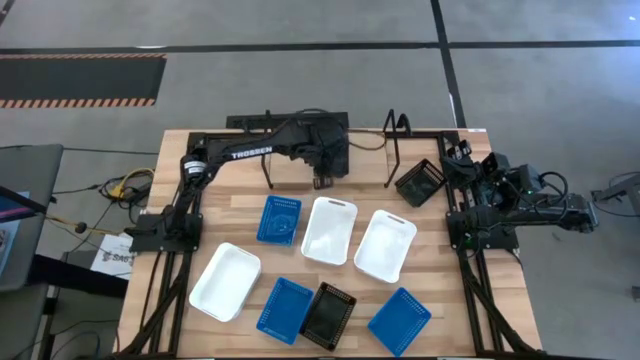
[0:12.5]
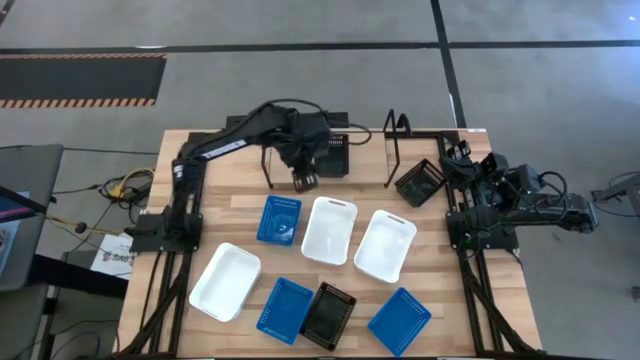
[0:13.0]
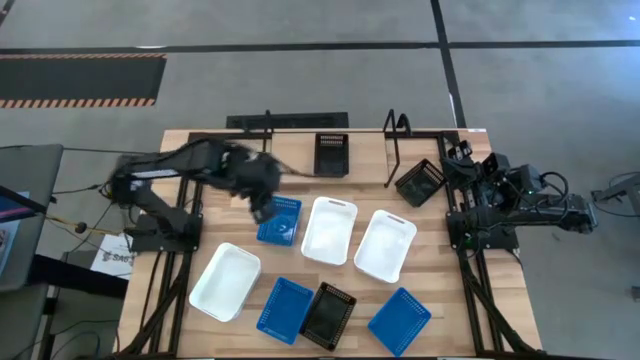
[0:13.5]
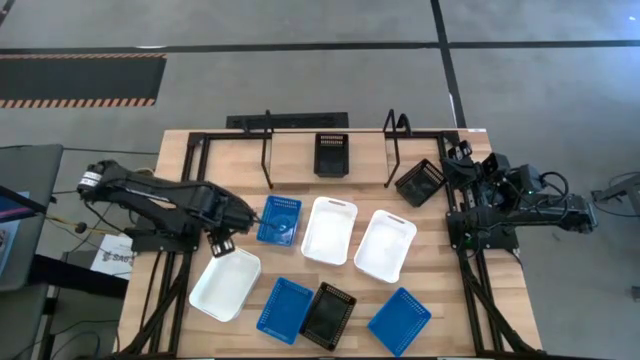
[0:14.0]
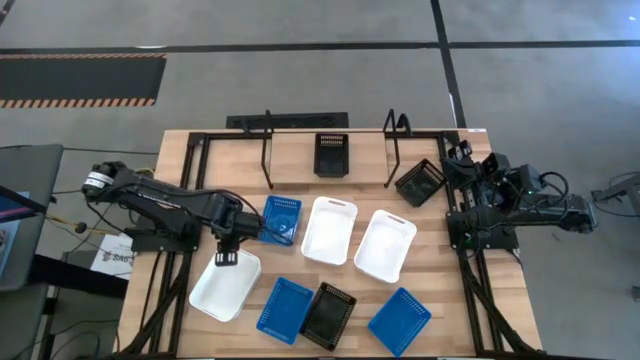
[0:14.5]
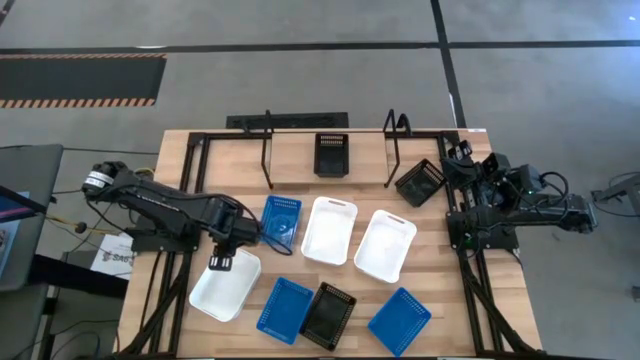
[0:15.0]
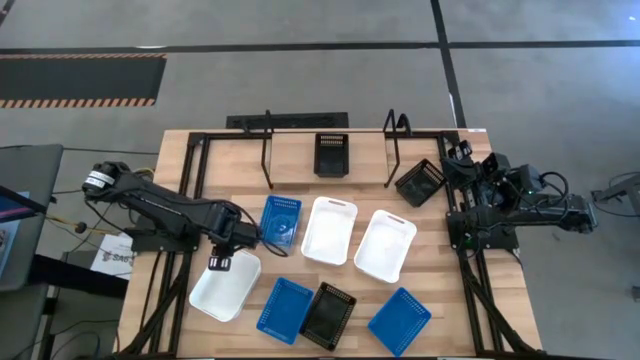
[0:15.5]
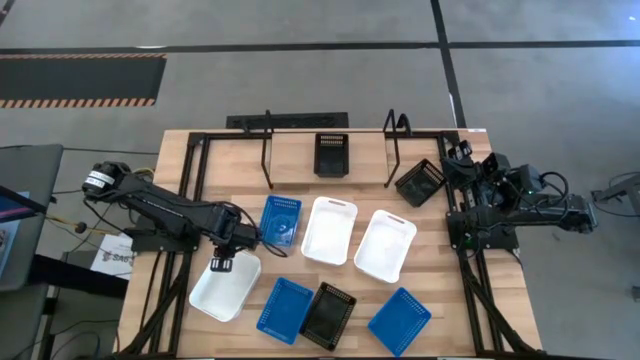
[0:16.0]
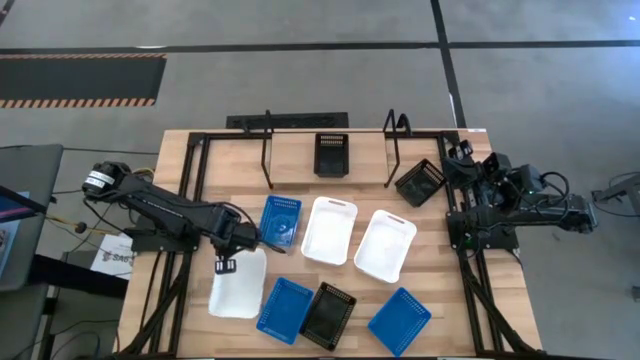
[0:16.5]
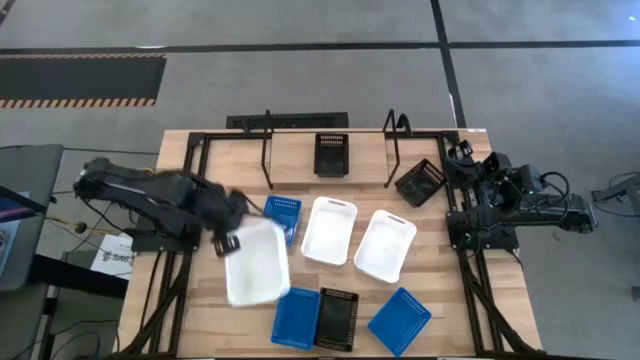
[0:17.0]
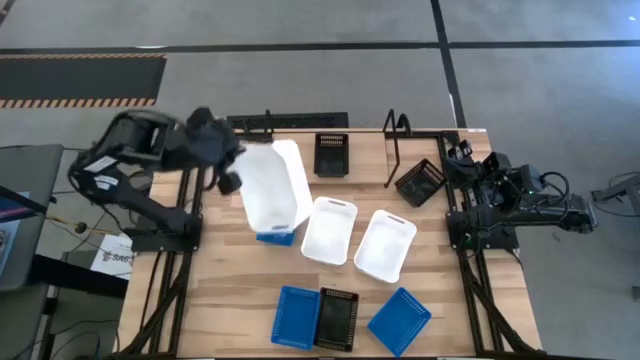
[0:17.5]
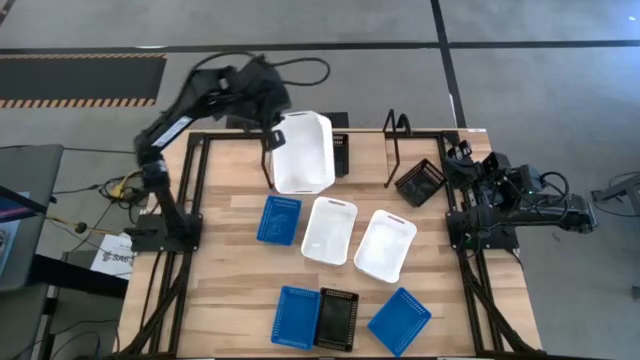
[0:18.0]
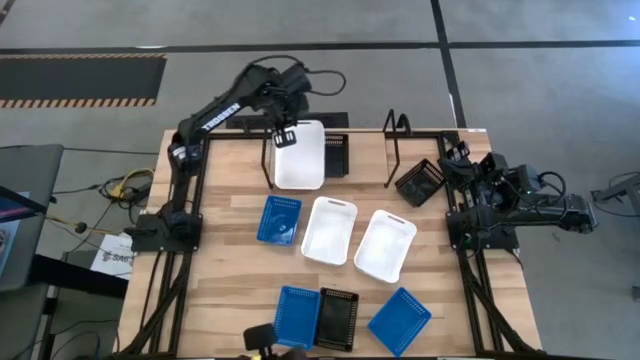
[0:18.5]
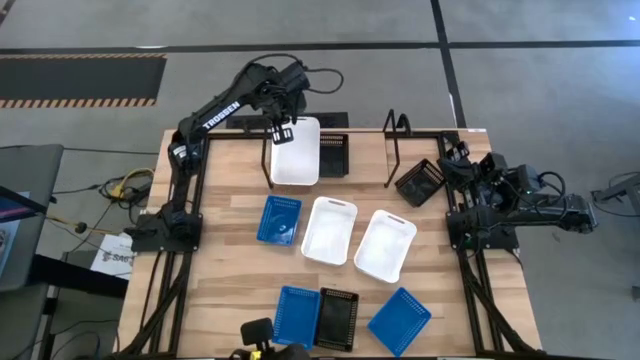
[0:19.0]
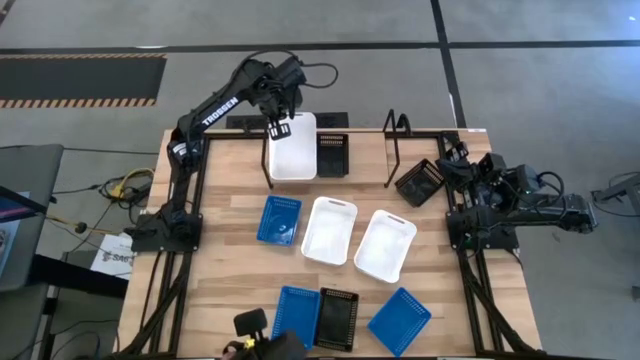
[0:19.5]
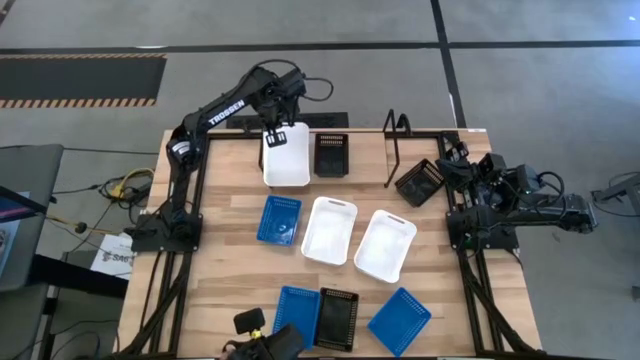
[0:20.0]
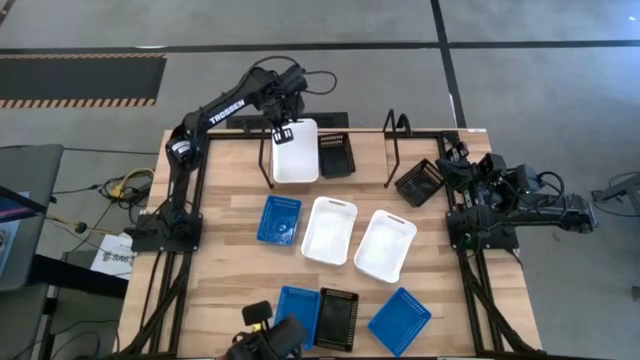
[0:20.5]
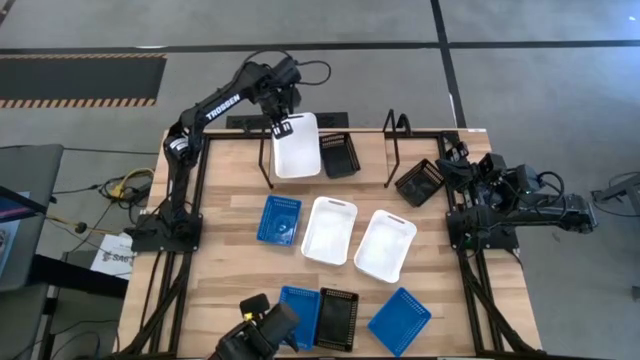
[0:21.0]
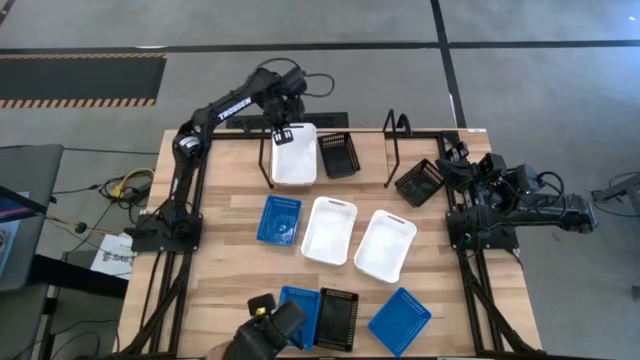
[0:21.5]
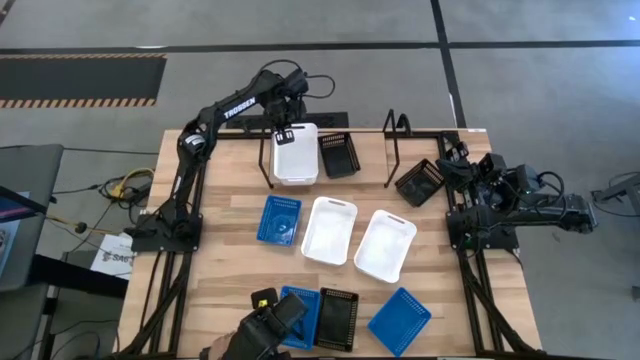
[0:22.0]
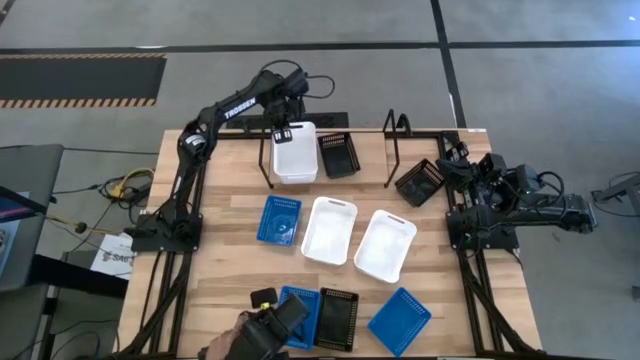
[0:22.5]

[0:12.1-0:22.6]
Task: Stack baskets on shelf by color
Put the bottom left white bin on the shelf

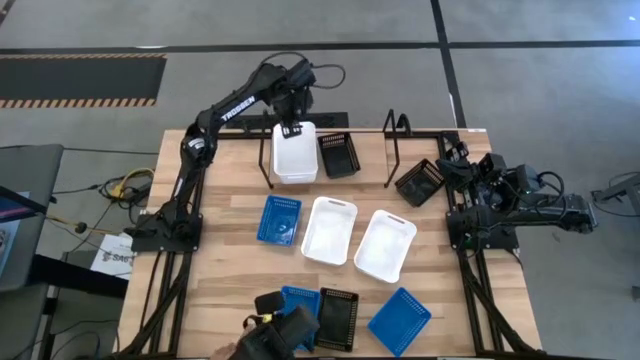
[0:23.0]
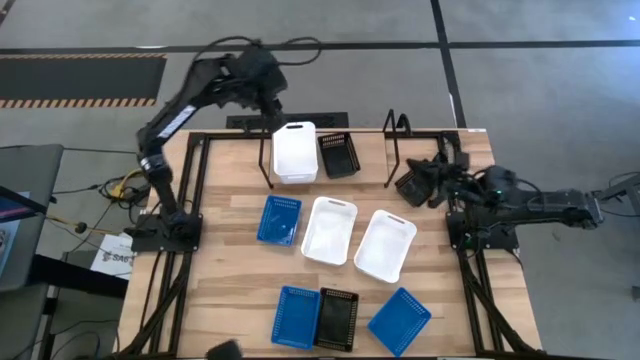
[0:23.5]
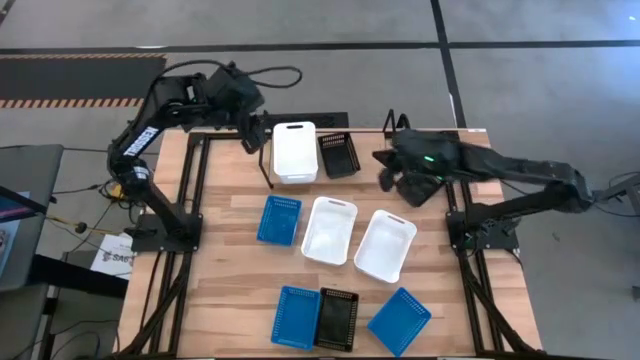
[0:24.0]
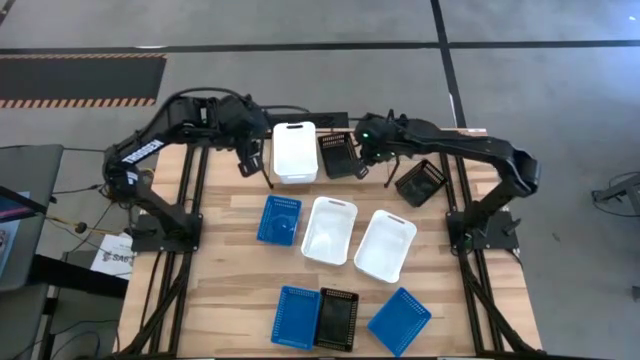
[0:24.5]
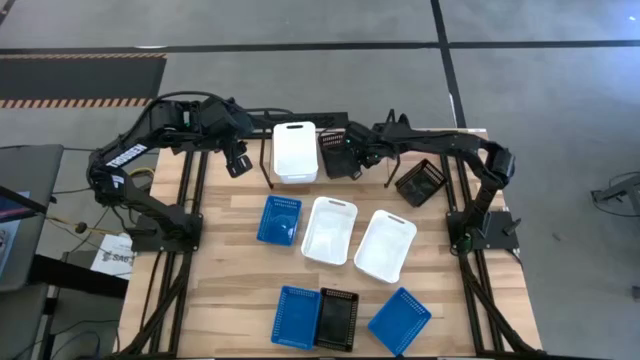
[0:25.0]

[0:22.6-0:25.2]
Adjust the black bin on the shelf

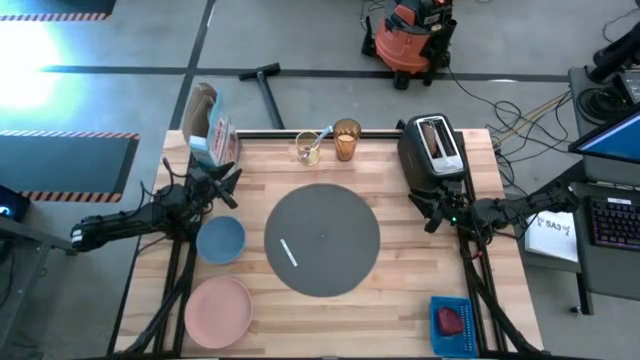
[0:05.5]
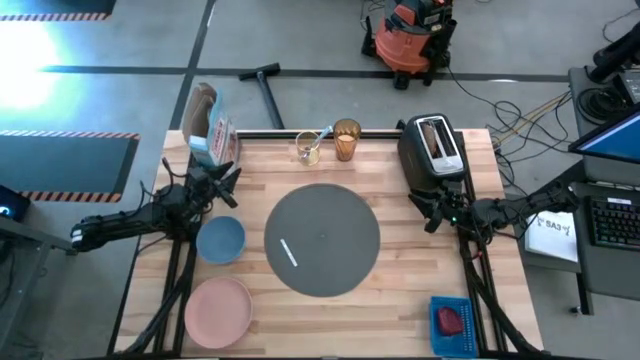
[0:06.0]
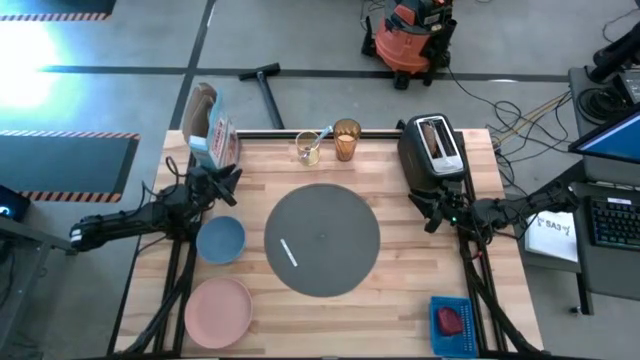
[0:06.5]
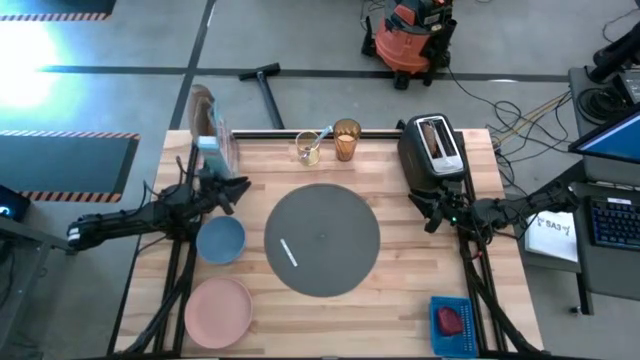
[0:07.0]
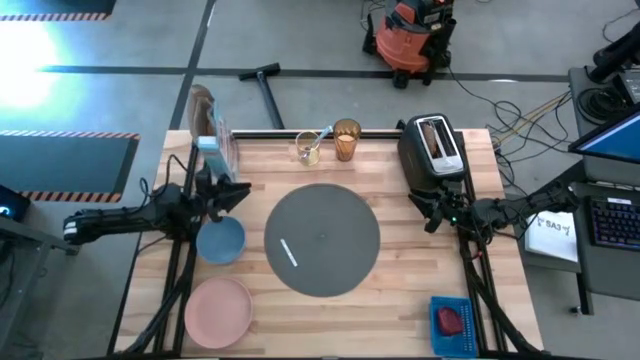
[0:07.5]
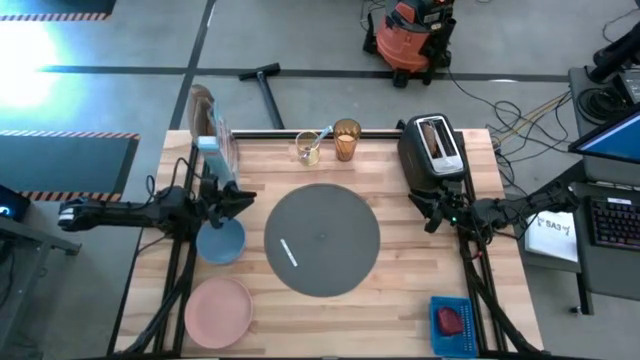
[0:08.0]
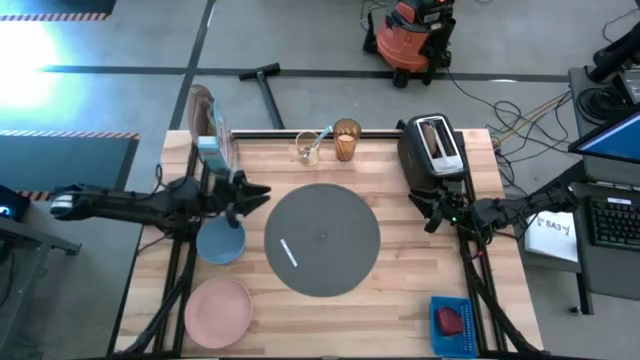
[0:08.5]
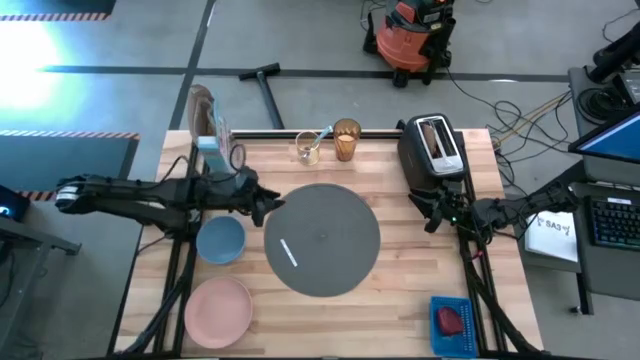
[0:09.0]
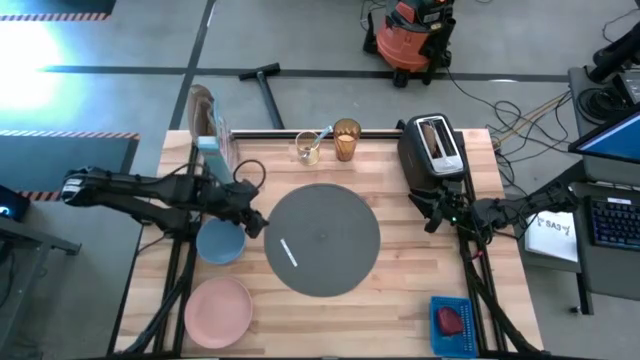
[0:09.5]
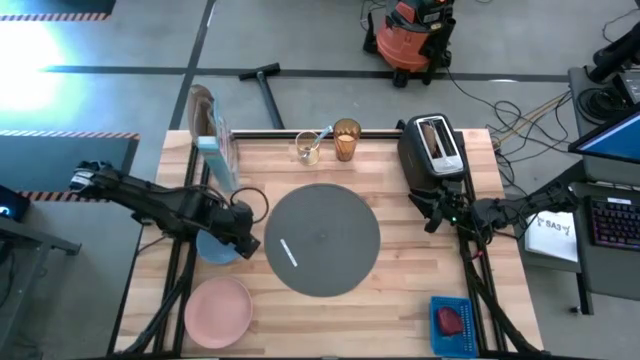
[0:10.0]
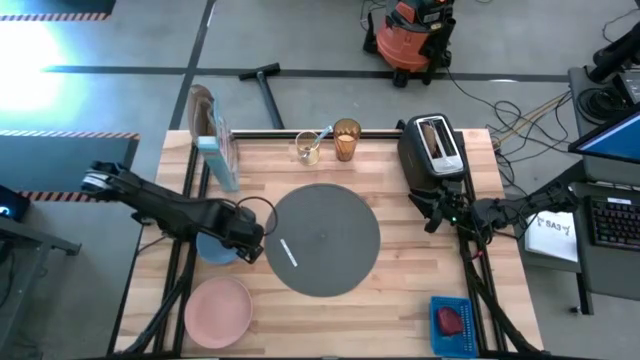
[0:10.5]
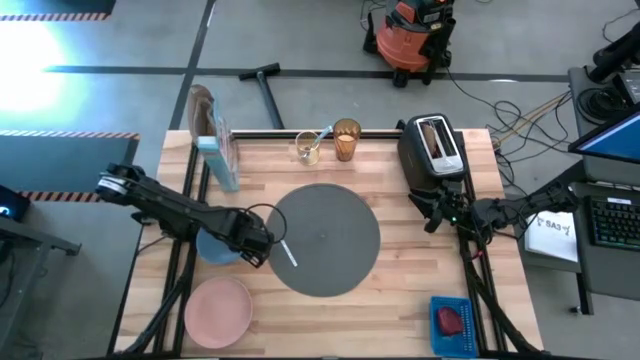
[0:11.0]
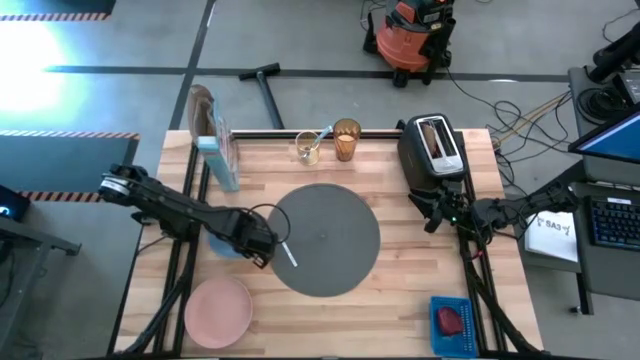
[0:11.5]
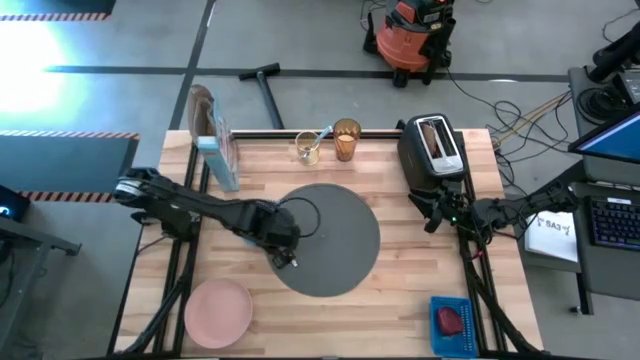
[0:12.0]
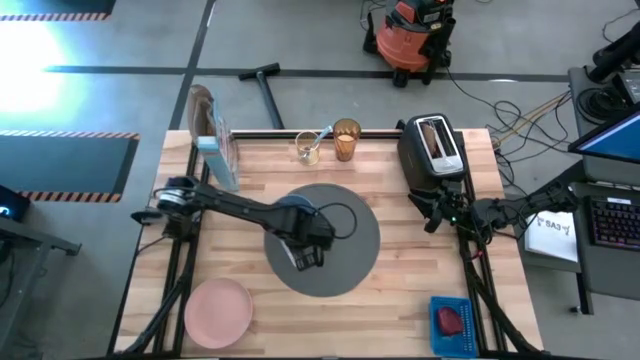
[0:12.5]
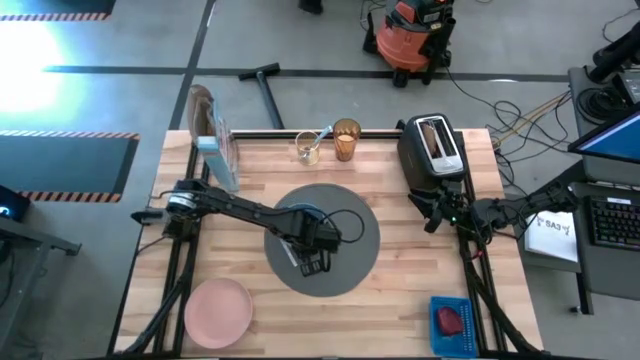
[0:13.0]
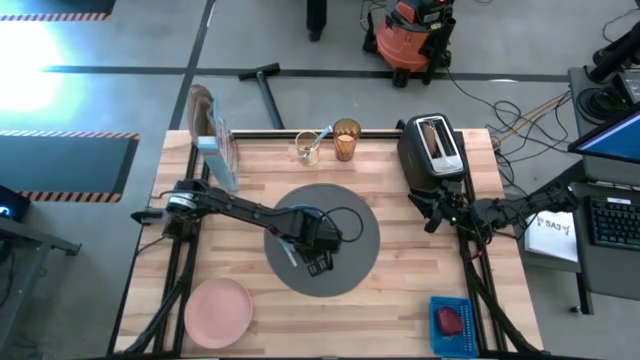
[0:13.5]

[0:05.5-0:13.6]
Task: Arrange a breakfast setting
Put the blue bowl on the gray table mat
